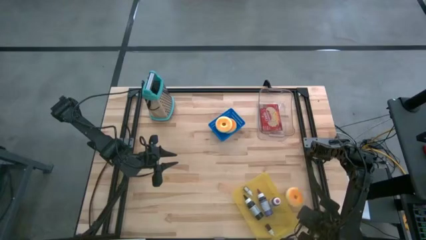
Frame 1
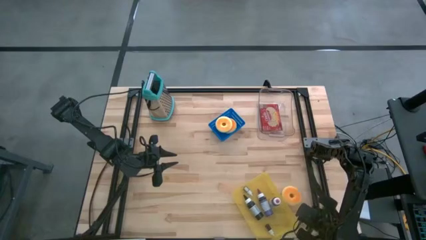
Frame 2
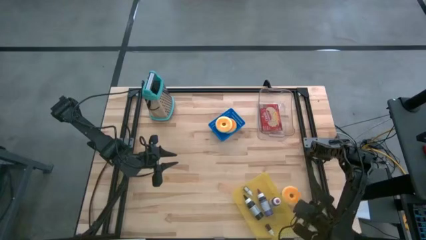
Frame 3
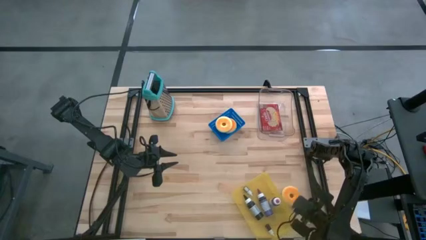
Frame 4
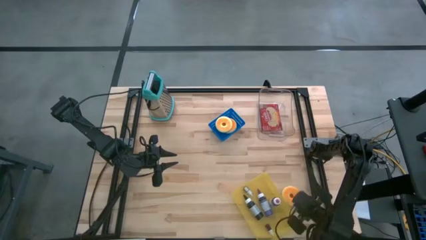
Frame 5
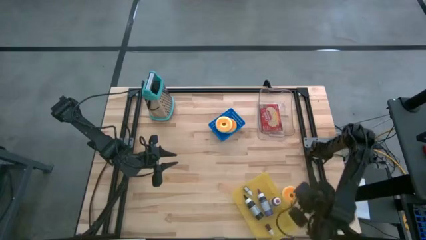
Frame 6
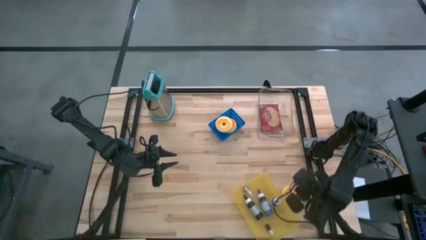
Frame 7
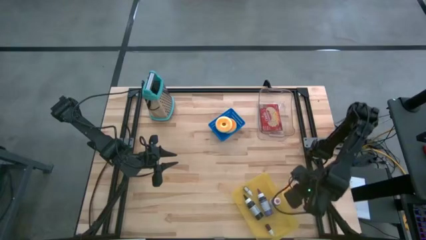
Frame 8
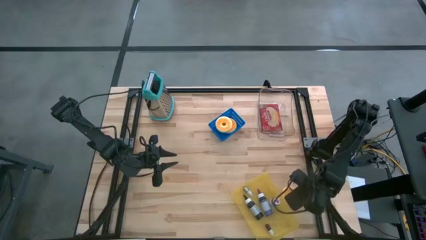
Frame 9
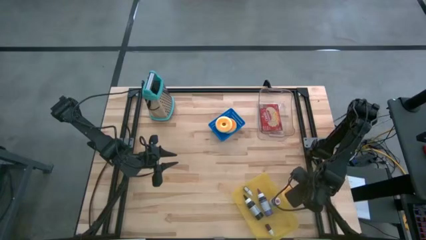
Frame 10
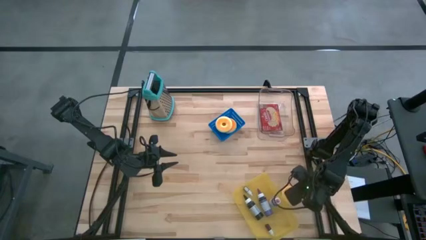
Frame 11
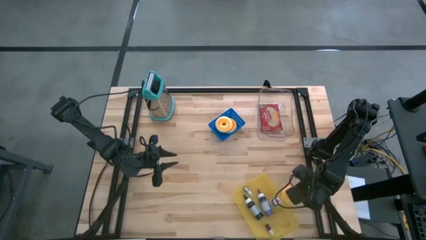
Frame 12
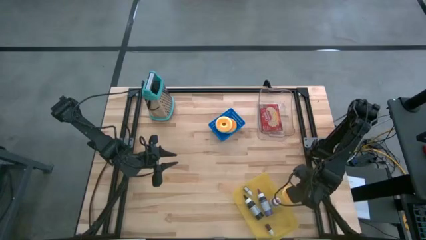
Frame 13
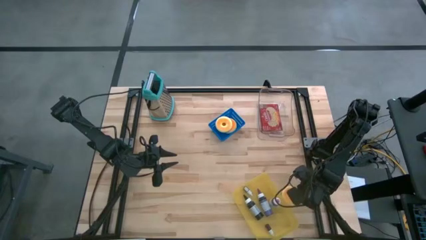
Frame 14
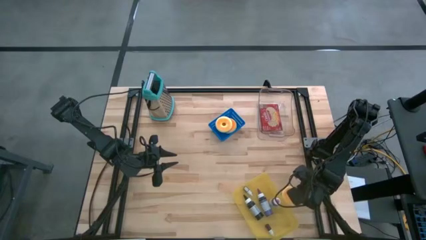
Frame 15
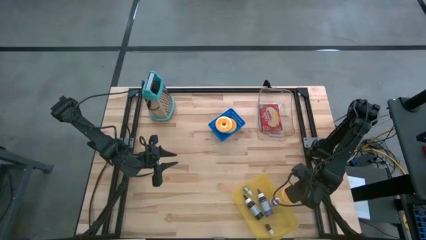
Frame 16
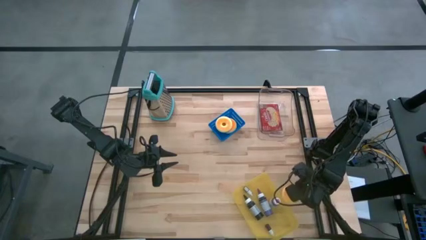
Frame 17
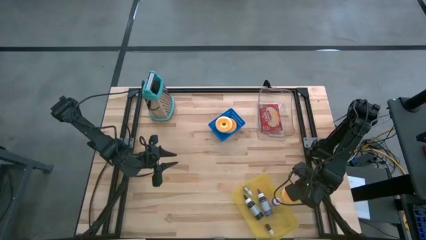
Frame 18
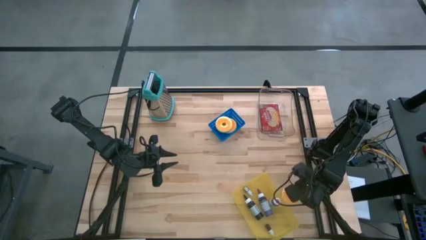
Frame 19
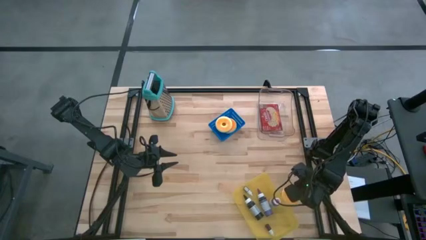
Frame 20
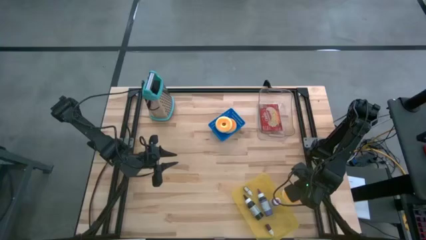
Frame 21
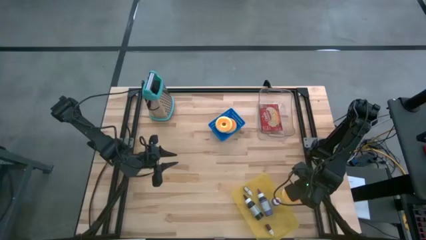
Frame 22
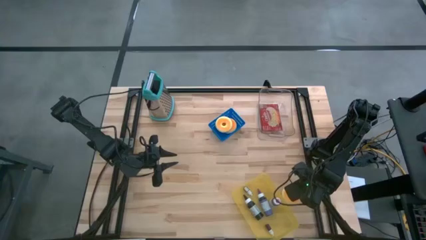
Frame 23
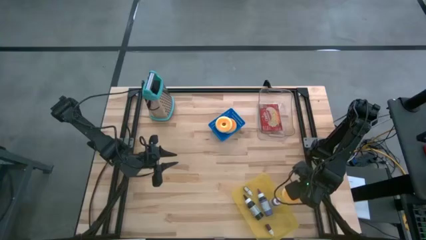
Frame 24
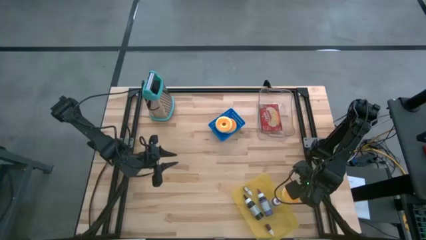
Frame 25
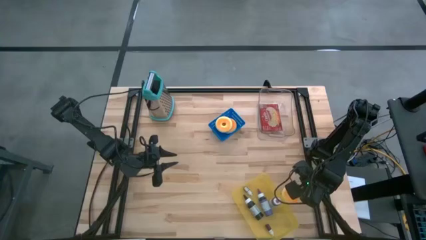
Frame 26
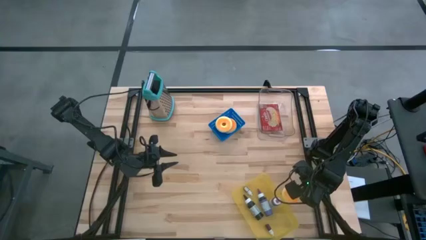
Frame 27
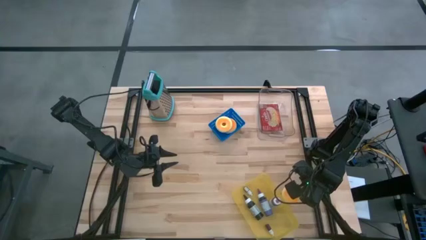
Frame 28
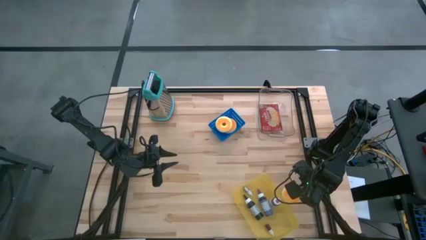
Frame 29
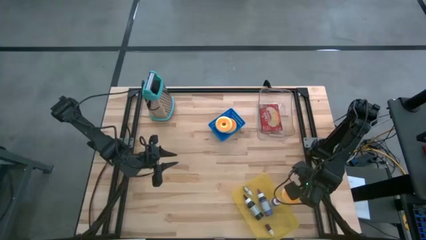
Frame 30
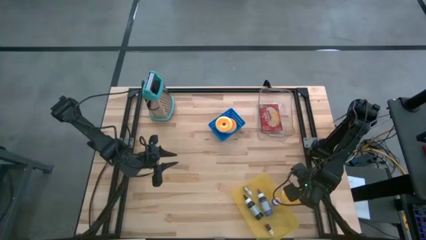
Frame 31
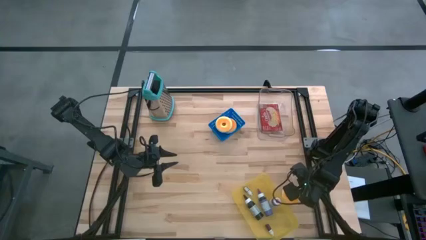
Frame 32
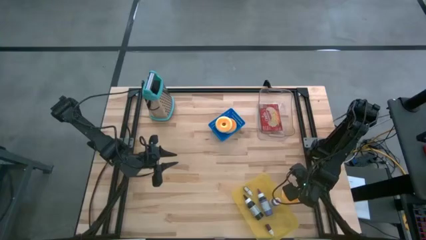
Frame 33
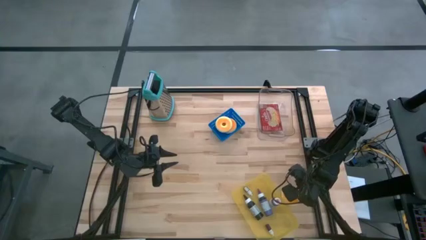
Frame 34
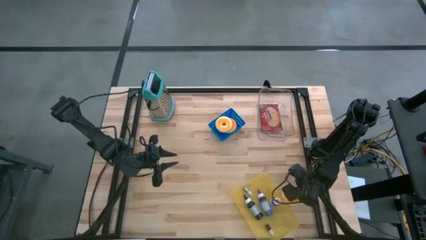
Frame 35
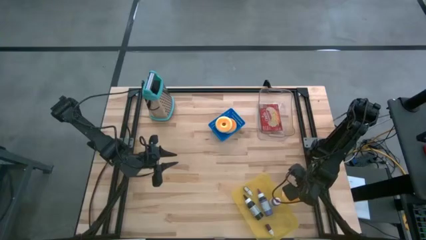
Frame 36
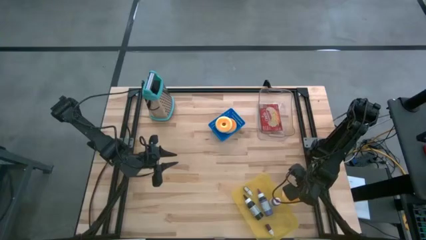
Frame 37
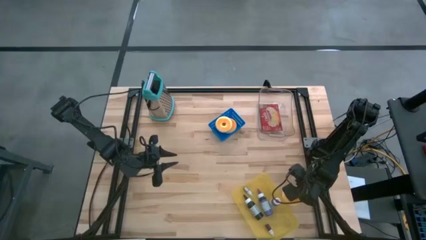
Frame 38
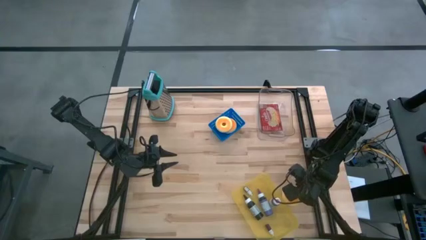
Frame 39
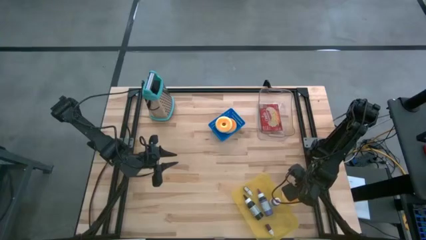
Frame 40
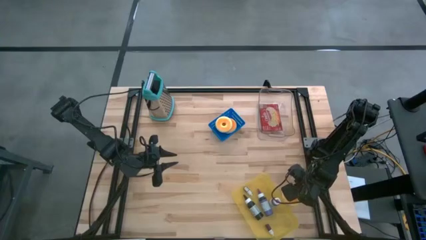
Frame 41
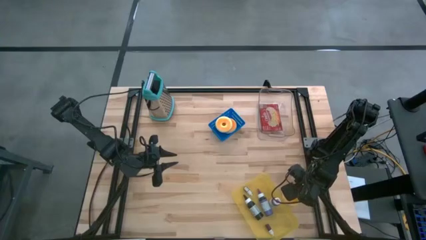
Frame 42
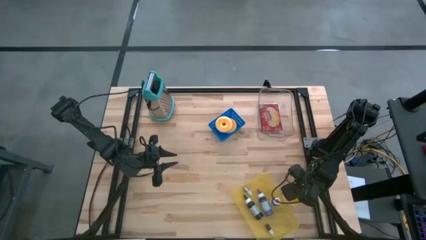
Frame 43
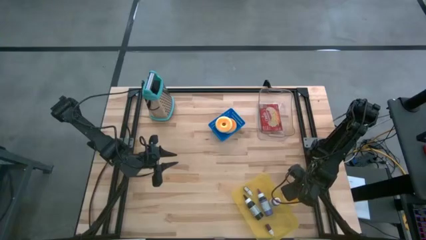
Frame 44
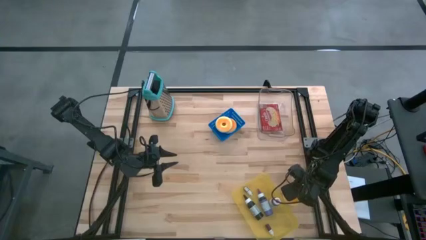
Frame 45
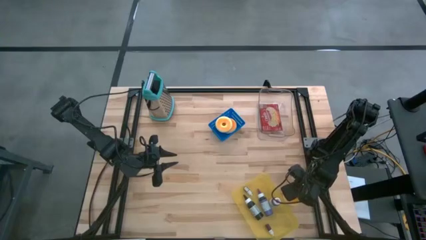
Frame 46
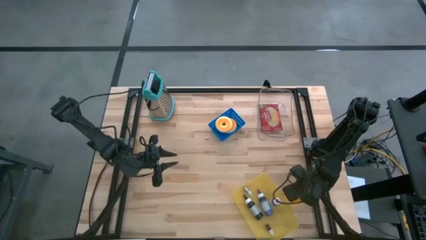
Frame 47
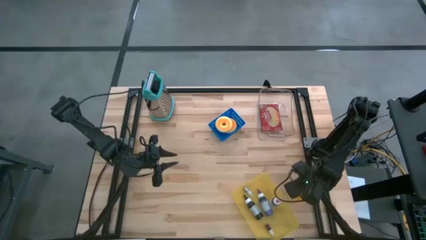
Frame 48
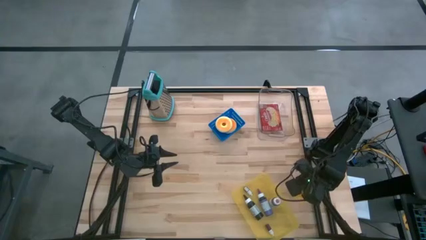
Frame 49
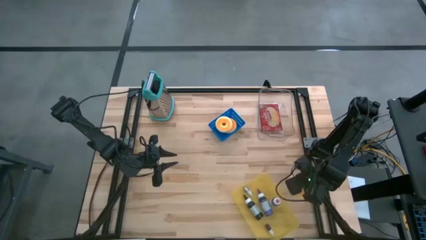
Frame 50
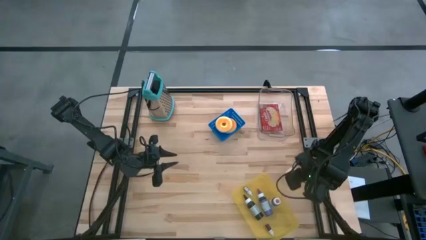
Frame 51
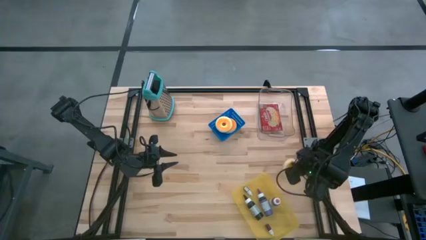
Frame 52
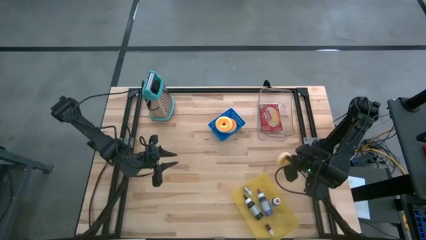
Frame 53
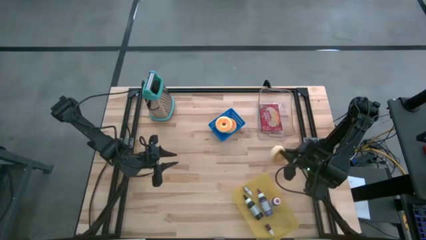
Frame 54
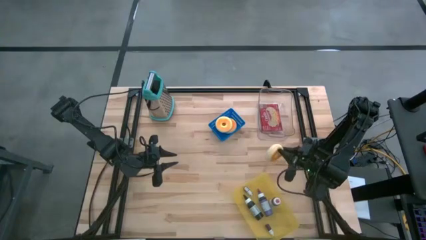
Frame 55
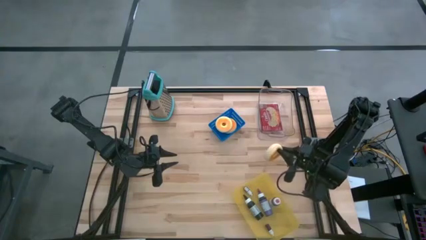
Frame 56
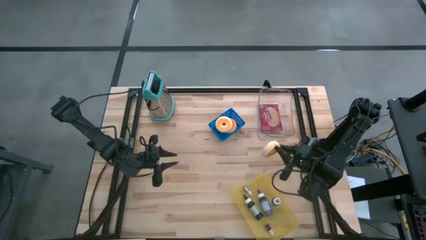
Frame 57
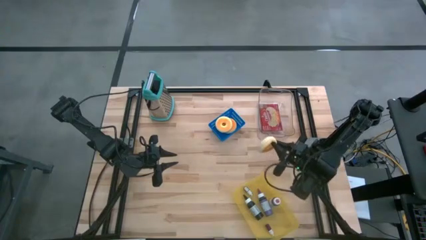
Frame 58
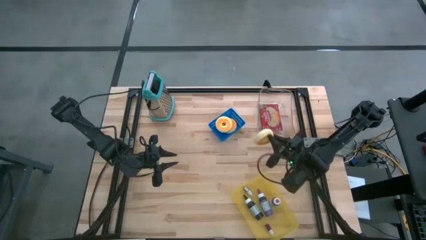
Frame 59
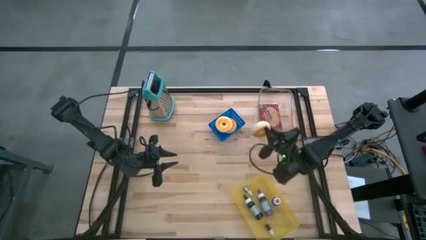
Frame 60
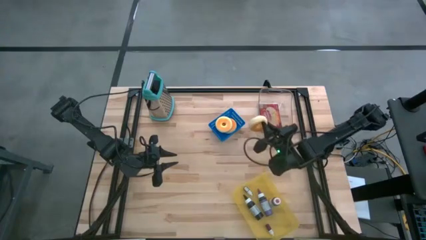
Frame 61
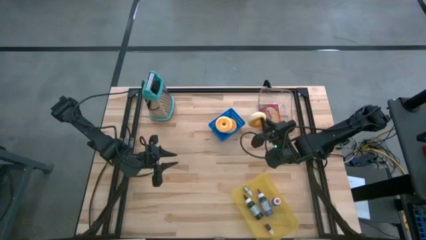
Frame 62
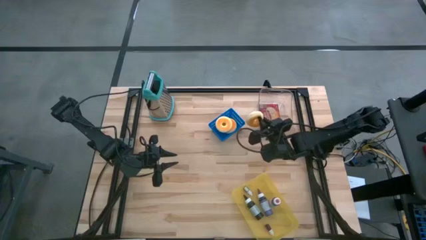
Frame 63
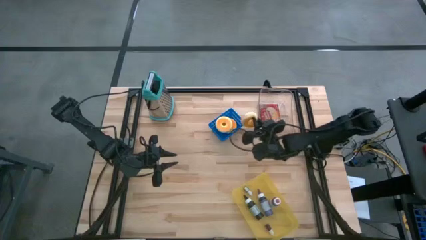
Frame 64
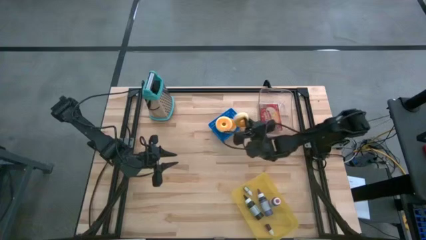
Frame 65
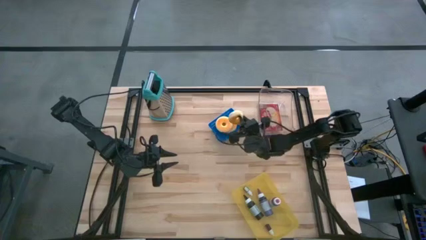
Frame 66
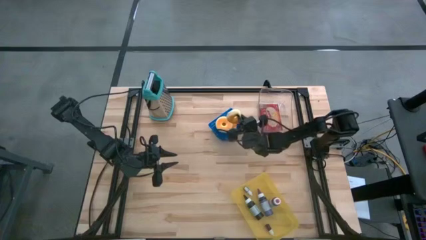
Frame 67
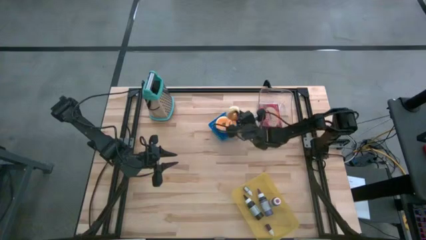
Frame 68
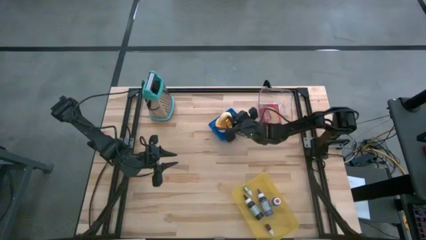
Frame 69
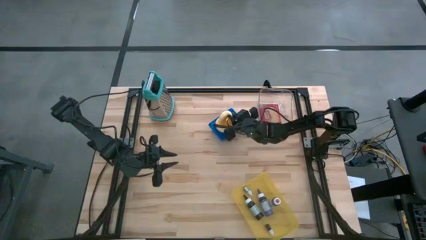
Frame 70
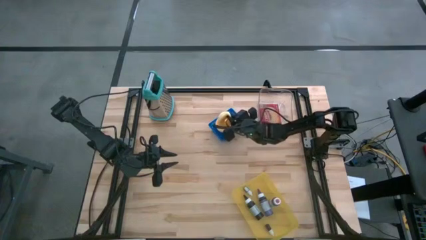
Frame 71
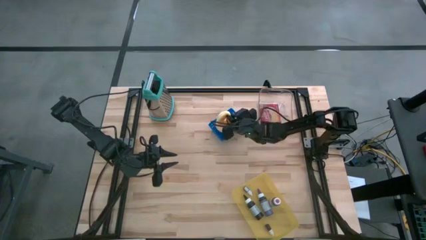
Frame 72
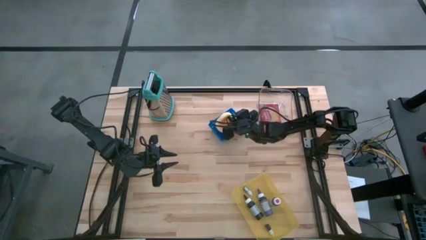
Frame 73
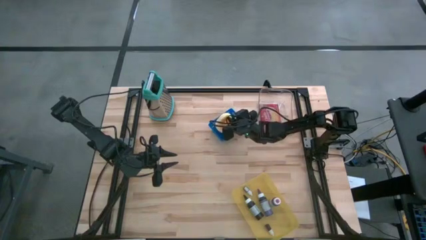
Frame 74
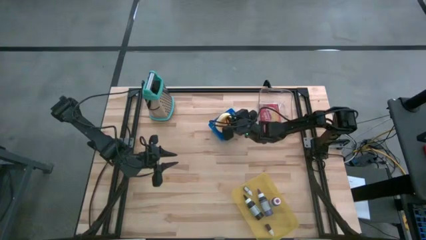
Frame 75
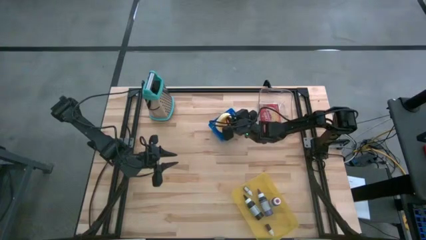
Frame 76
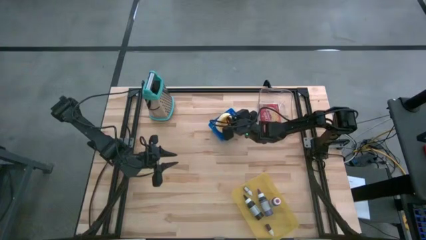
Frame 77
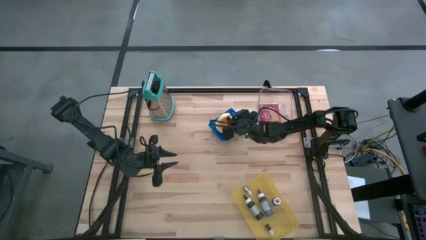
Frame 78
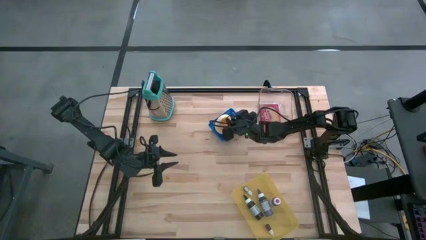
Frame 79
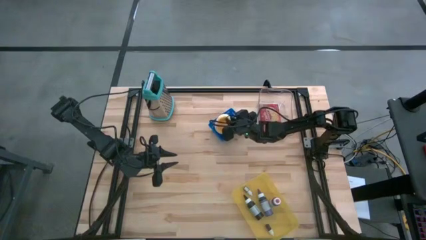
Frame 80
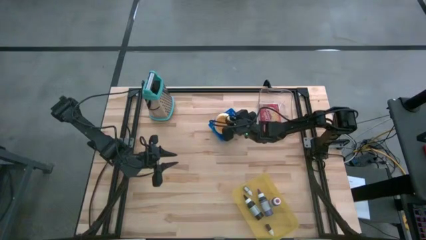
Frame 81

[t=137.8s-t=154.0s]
Task: Pick & Place Food Item
Stack the orange donut on top of the top orange donut in the blue bin

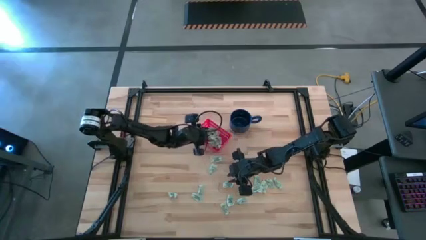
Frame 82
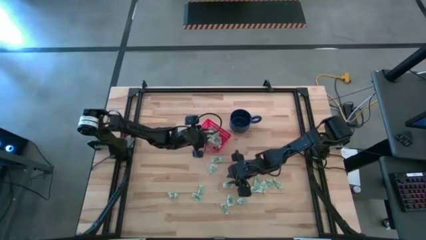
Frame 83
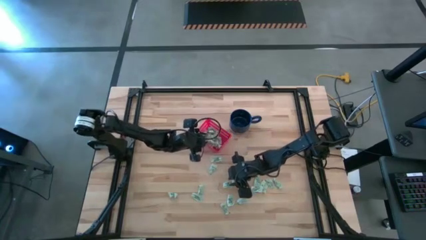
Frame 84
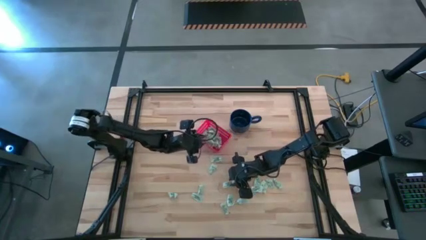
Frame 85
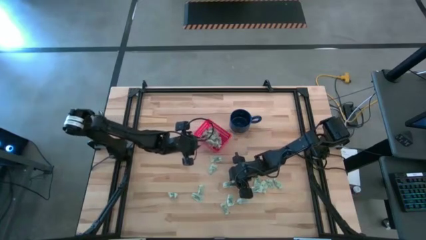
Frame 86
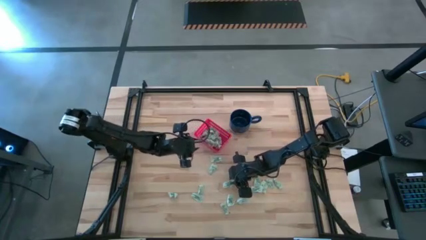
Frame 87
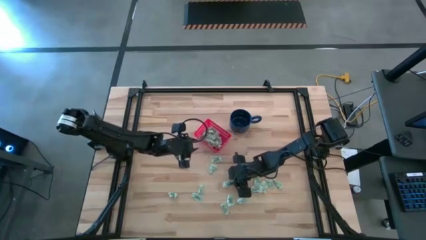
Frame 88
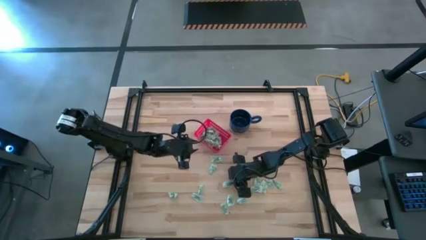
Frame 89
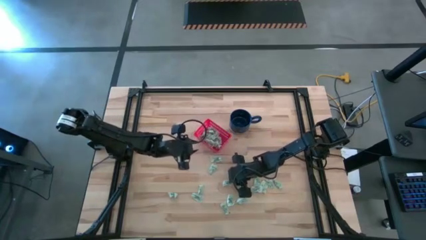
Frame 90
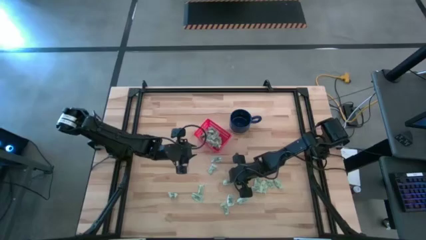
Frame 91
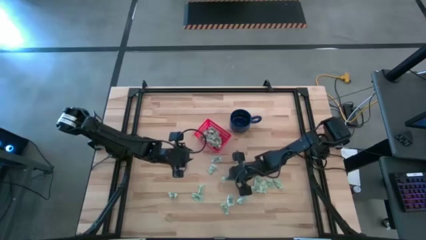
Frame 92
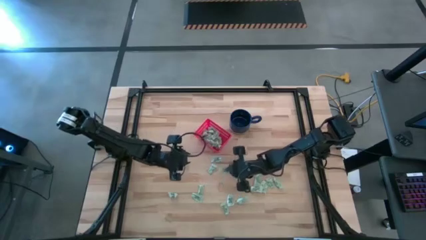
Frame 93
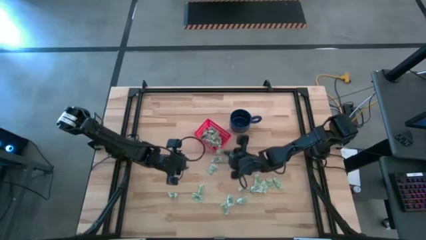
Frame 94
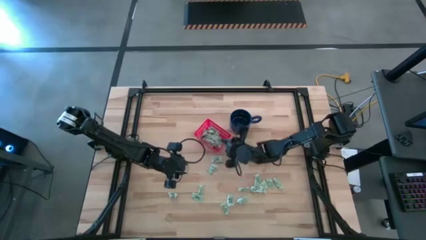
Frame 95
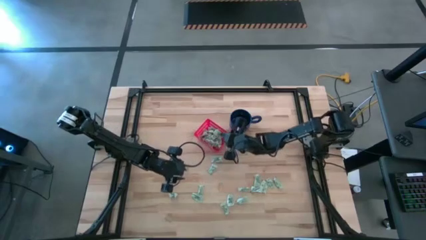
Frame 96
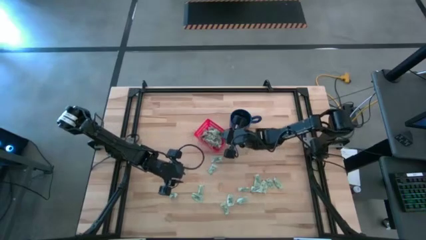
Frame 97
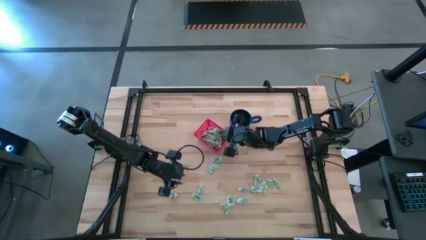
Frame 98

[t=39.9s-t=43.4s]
Task: Pick and place items into bin
Put the stevia packet into the bin
